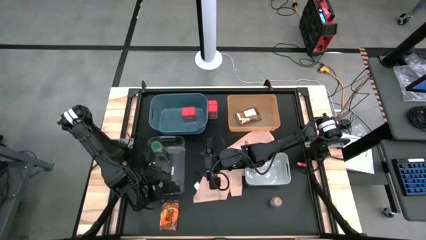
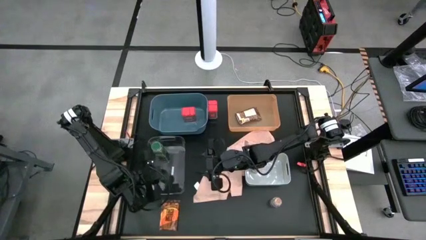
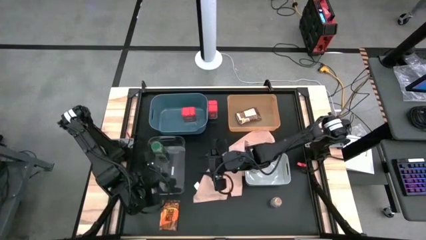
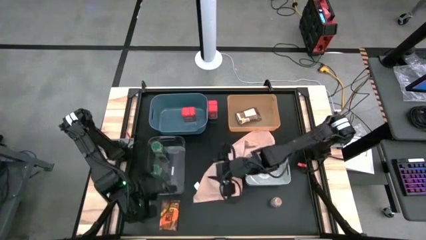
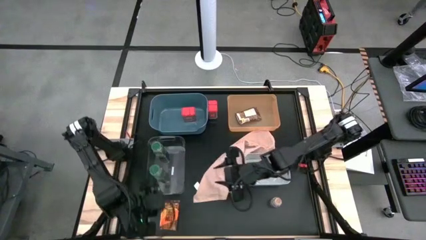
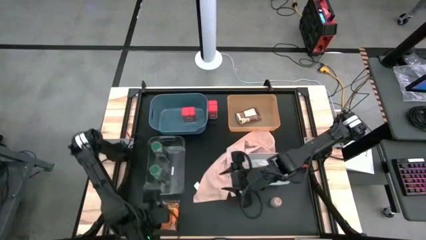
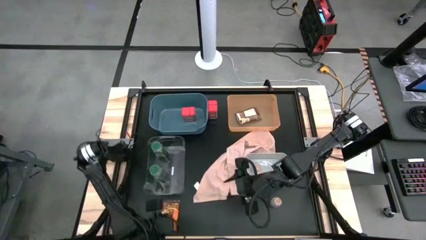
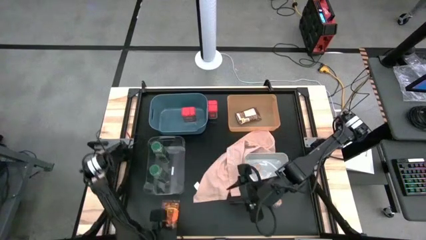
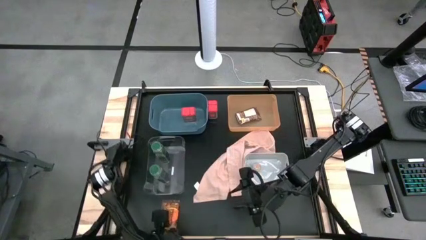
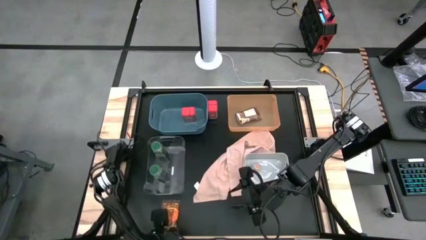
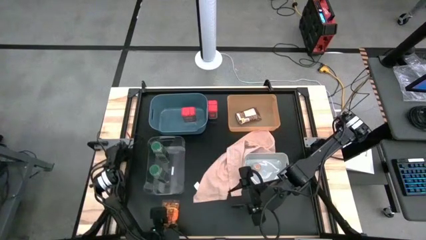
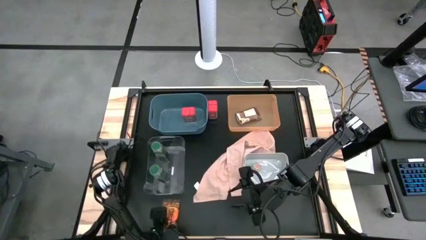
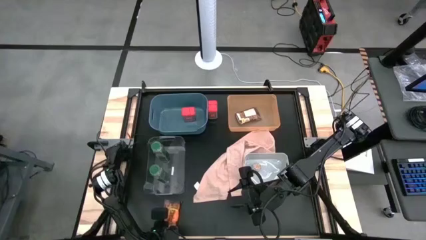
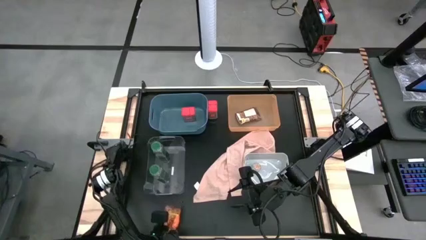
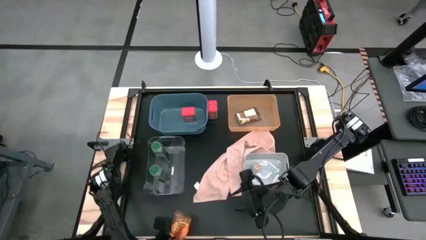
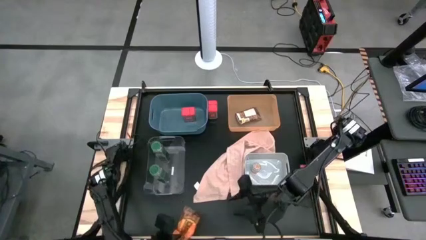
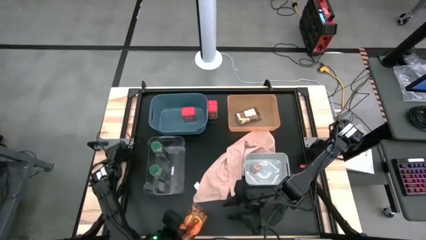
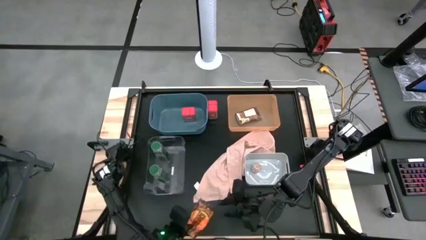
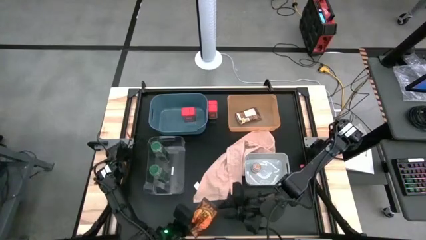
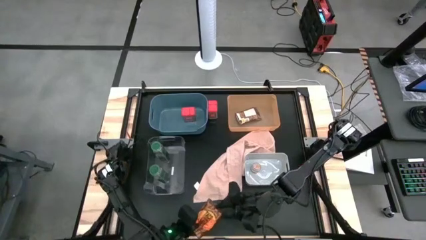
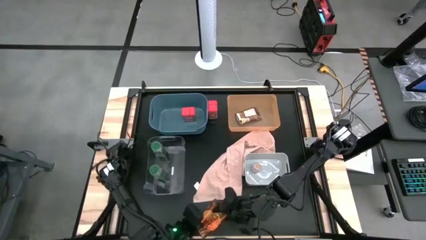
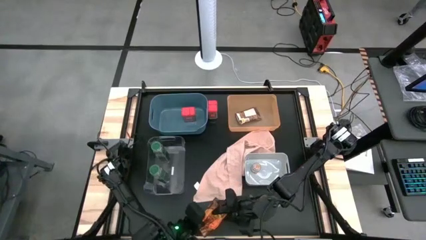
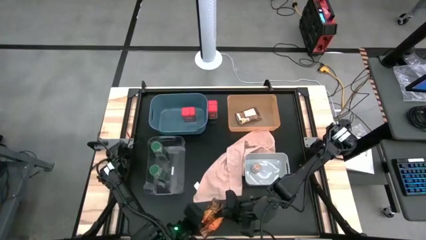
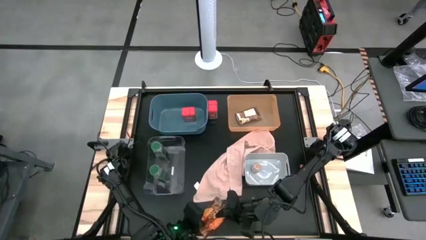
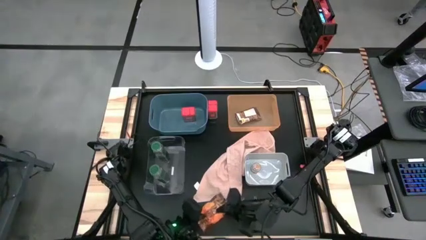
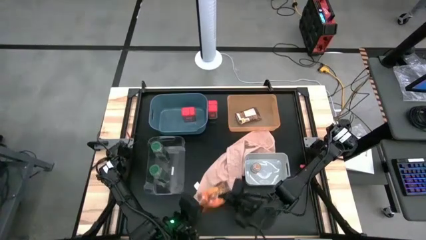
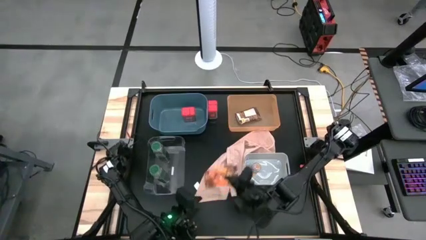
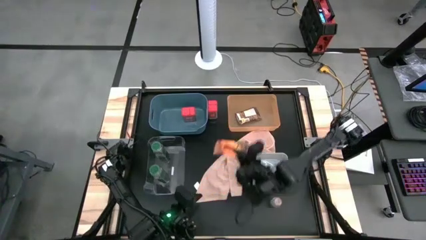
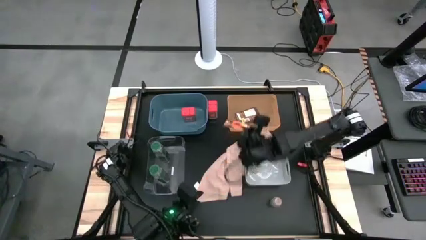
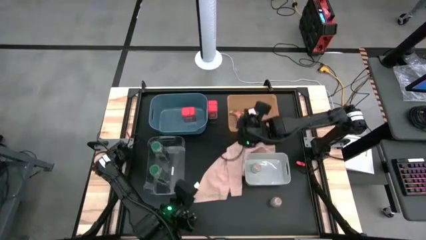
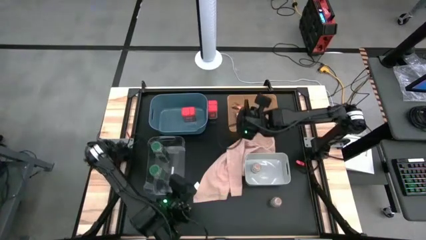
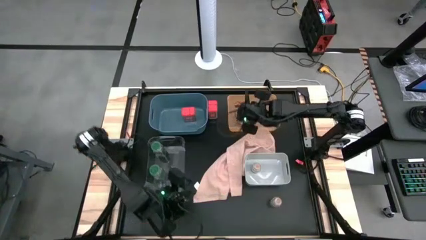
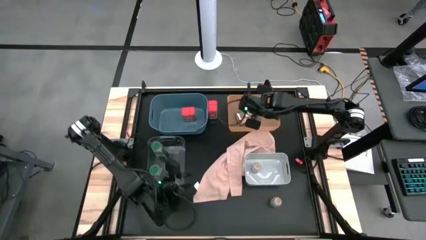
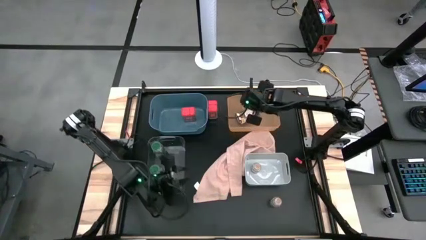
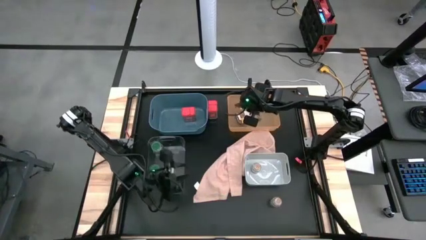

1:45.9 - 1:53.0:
Task: Sort spices by type
Put the orange seasoning bag into the orange bin

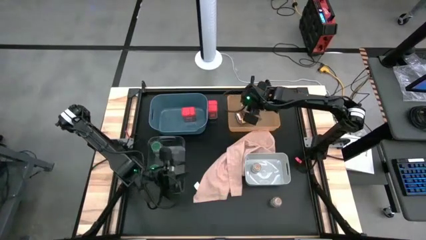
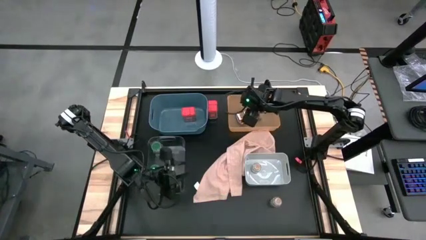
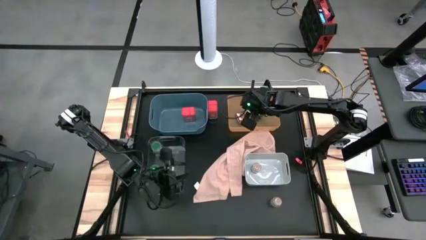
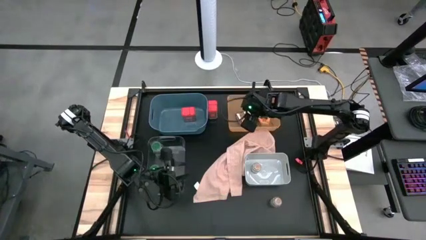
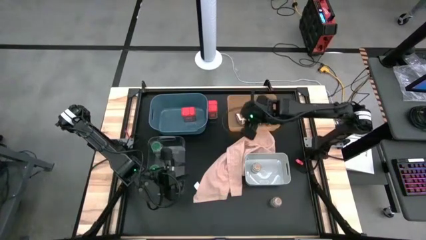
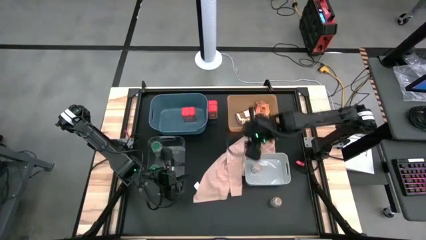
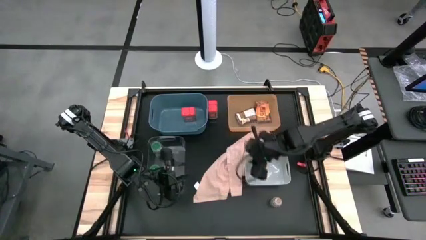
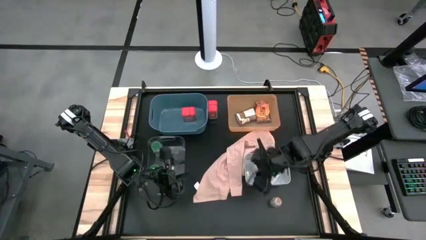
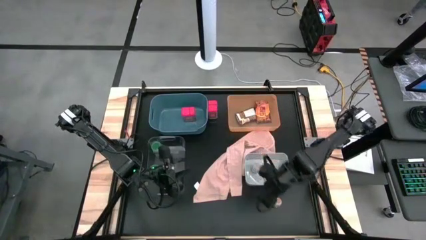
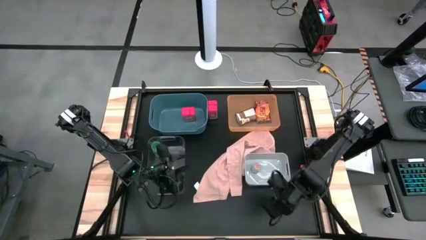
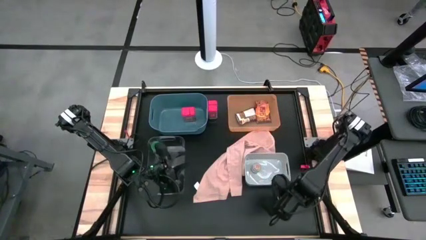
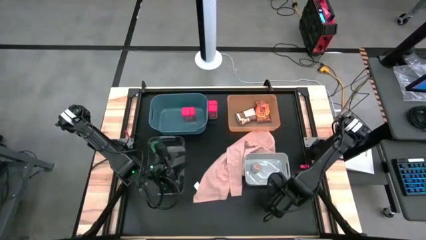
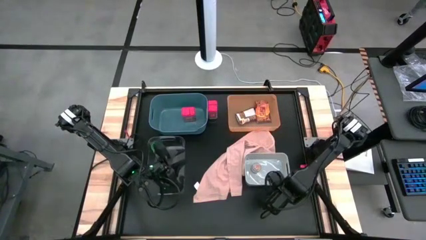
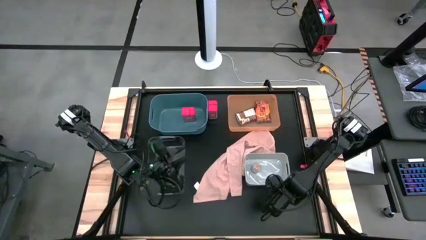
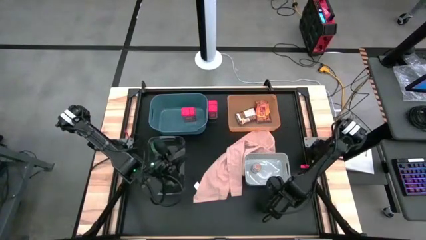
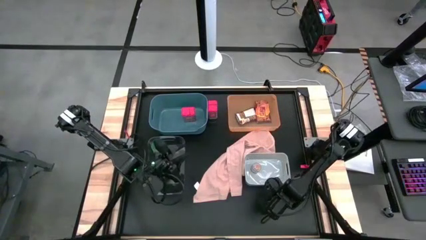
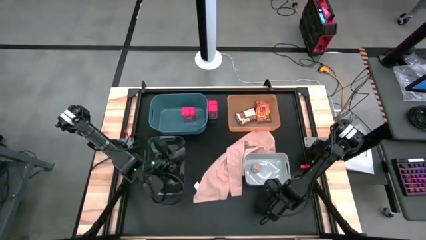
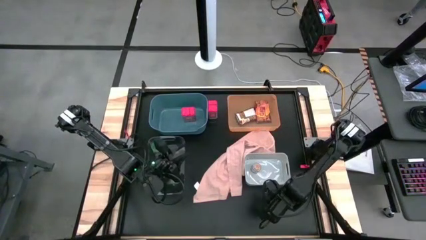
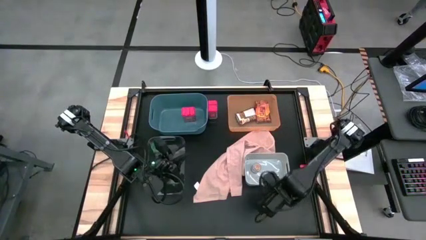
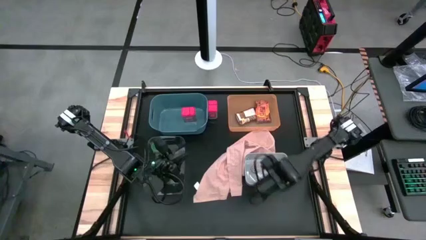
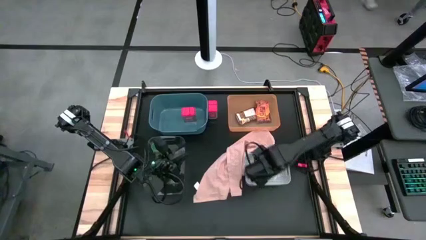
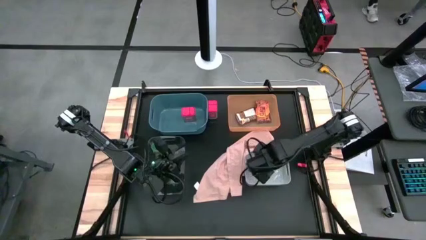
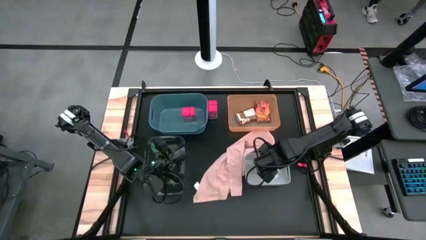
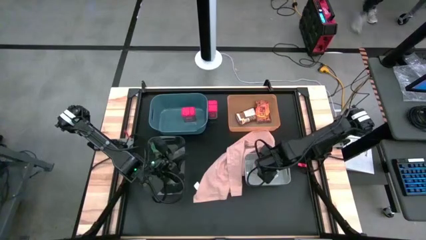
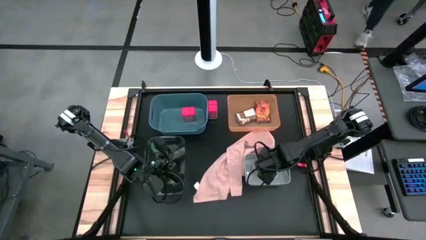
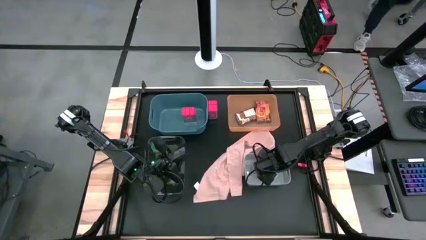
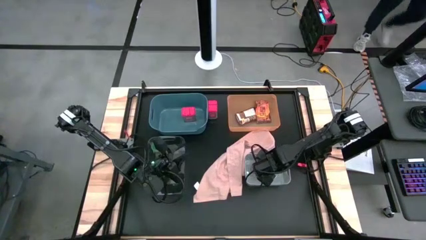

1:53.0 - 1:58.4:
Put the brown seasoning bottle into the white bin

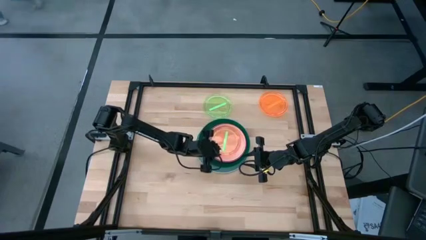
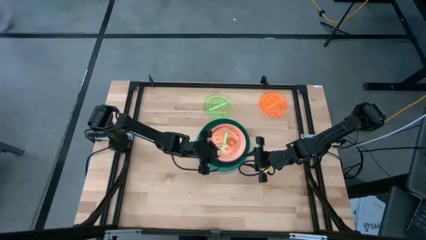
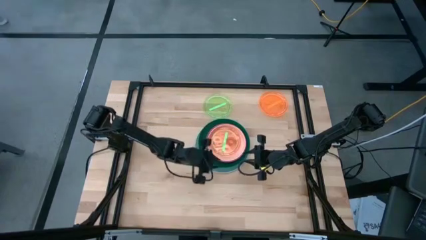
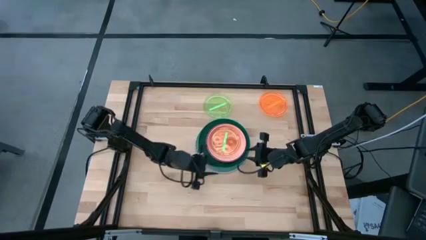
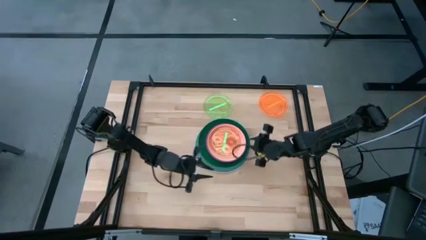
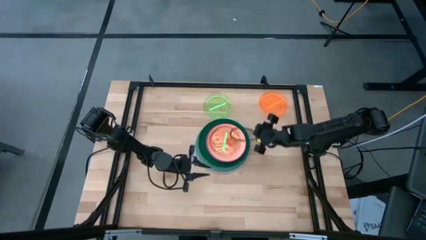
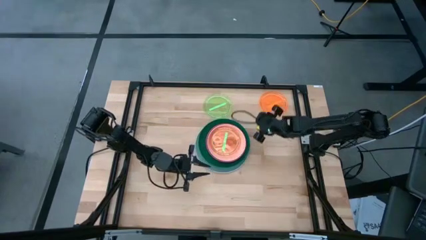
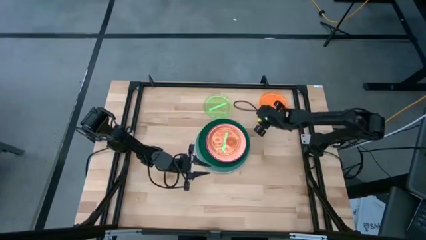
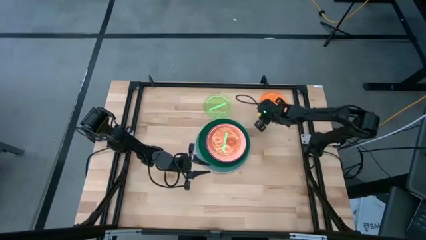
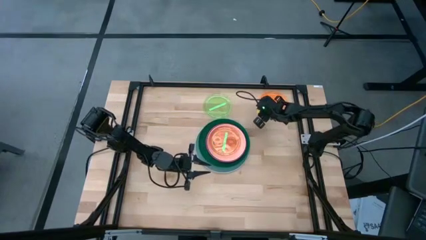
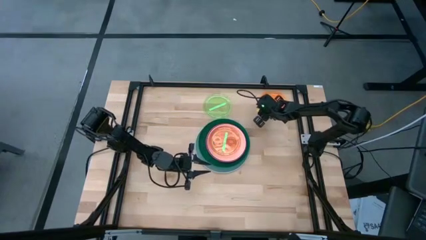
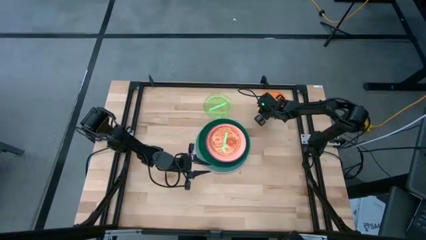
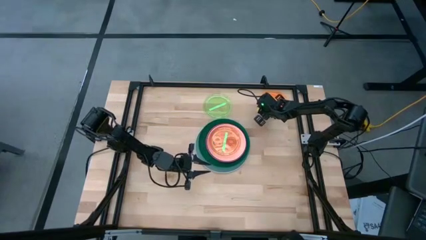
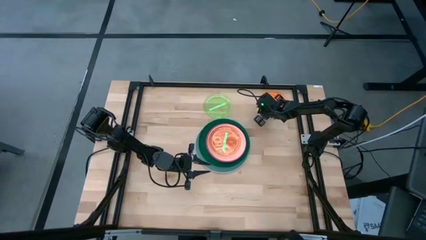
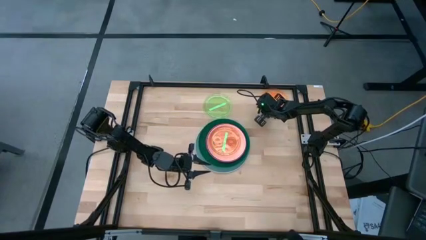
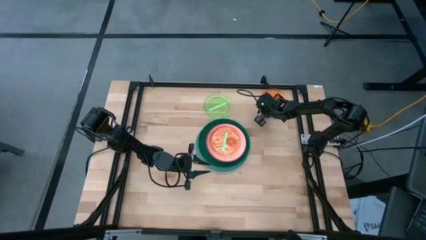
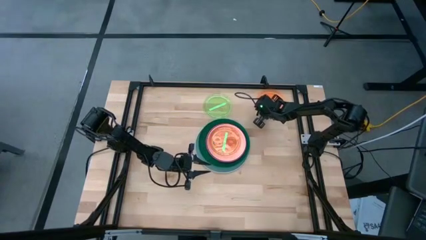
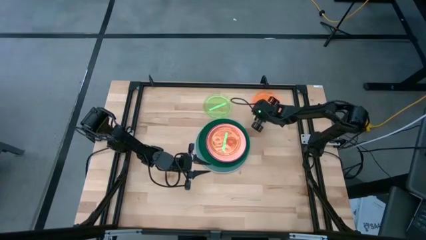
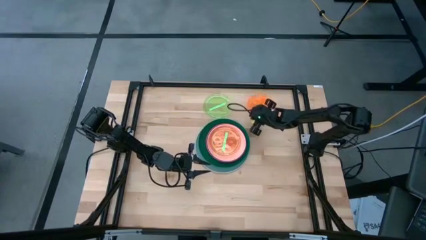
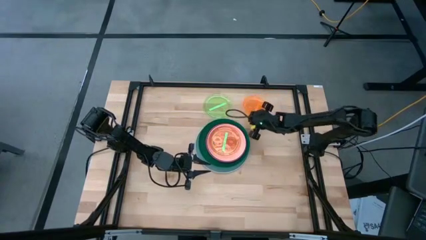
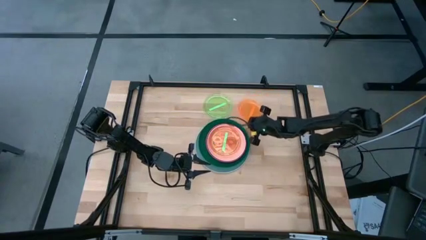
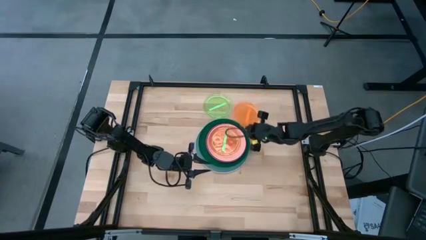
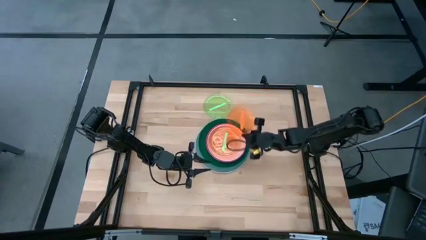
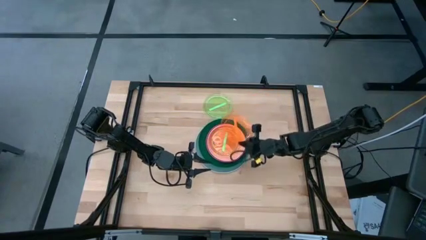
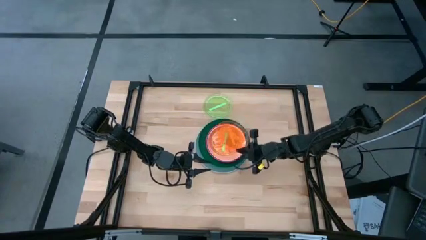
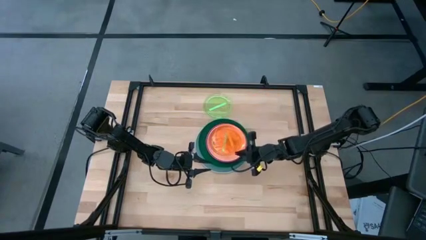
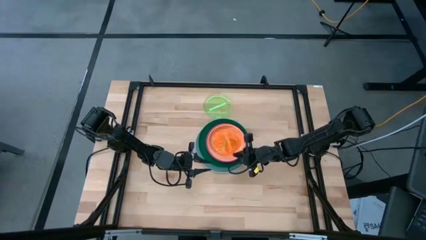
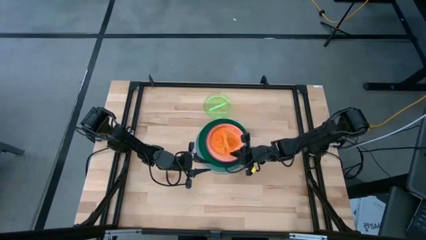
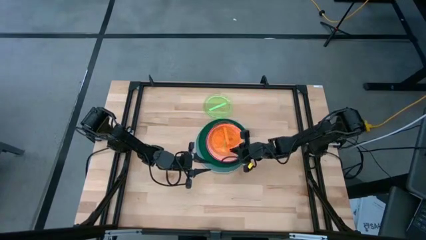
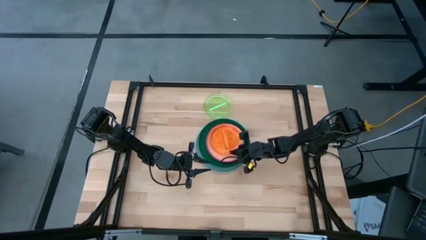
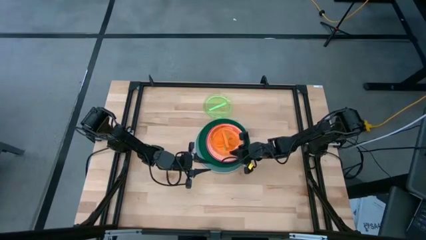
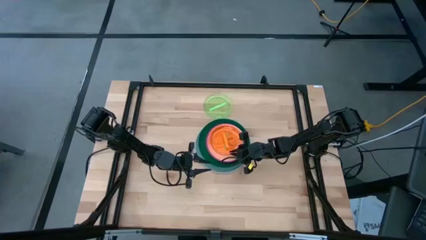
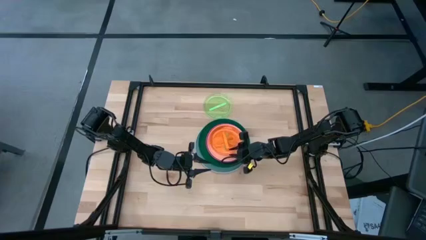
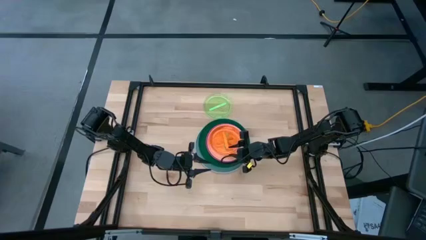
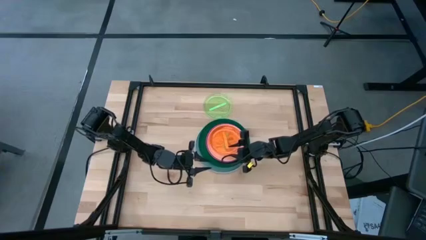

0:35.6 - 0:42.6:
Task: Stack plastic plates
Stack the orange plate on top of green plate
